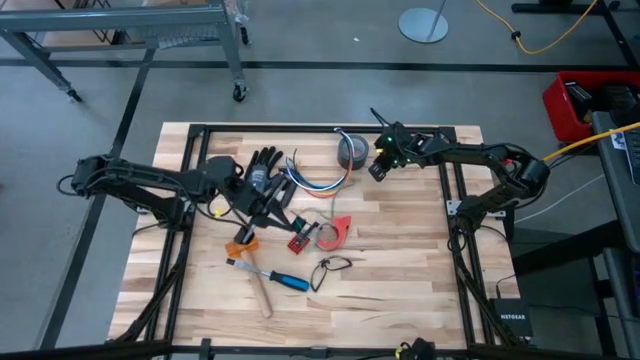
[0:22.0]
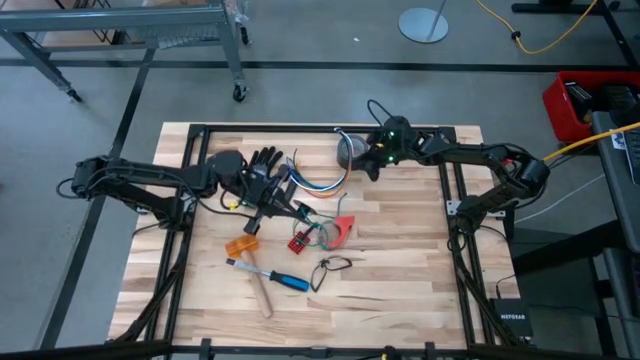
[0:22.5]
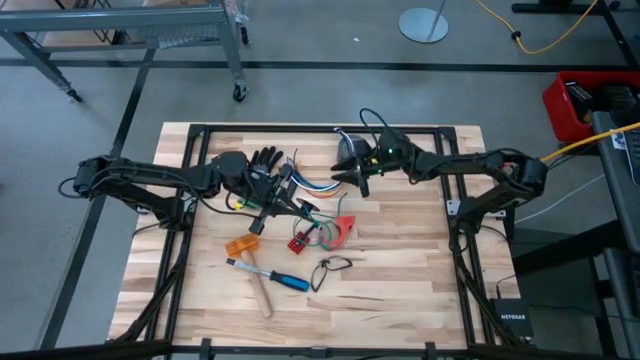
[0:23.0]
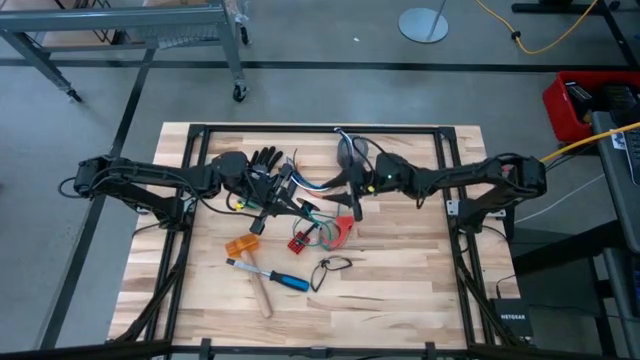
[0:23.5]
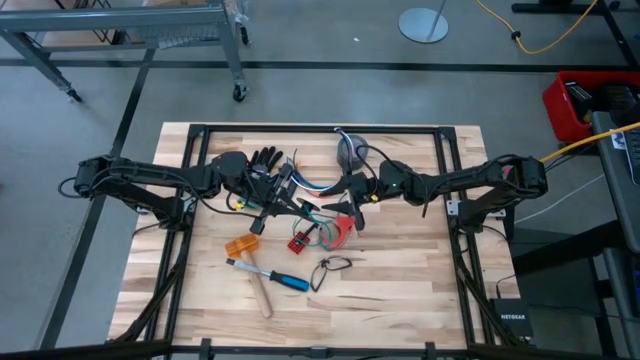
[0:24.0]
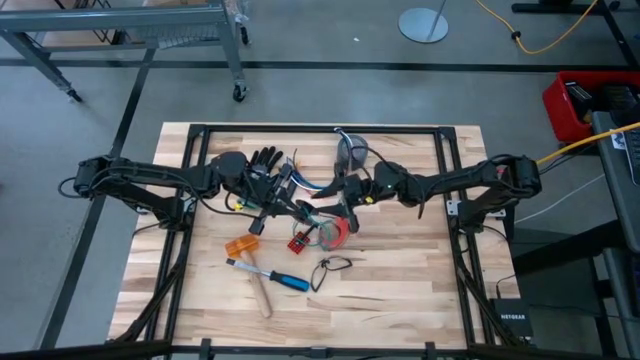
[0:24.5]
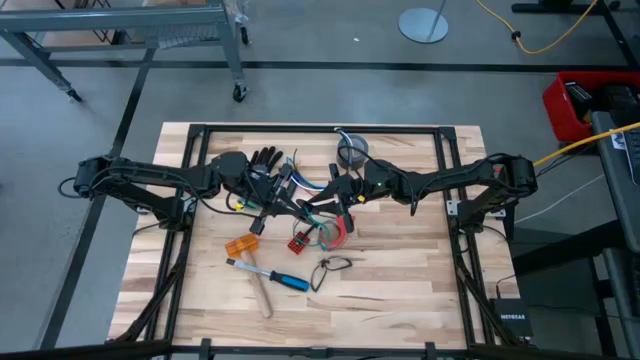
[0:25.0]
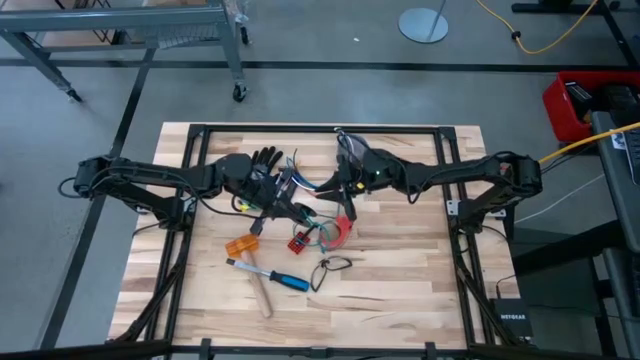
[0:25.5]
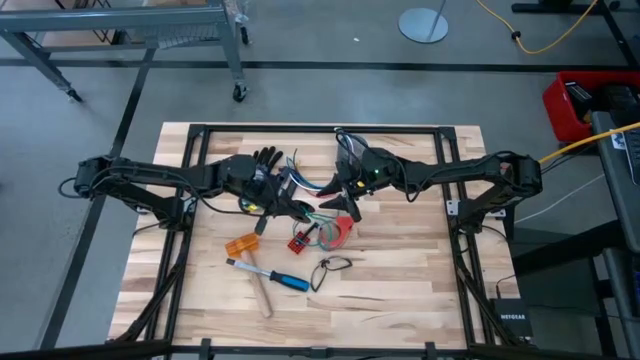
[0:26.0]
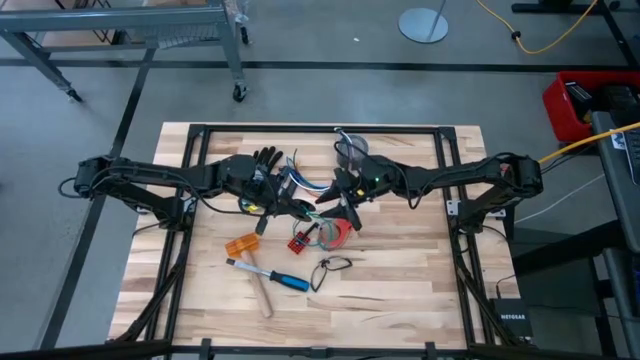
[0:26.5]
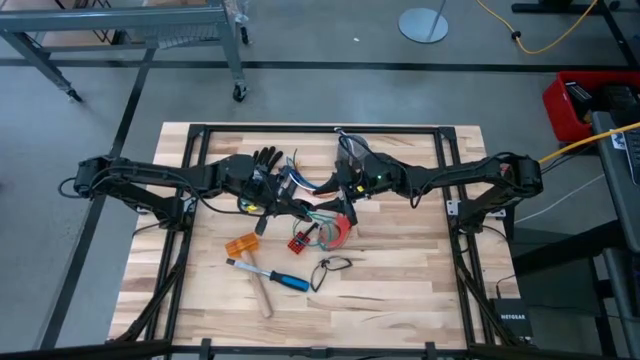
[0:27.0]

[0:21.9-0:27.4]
Task: Coil cords
Coil the wire onto the spool
